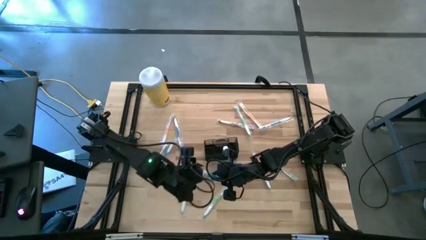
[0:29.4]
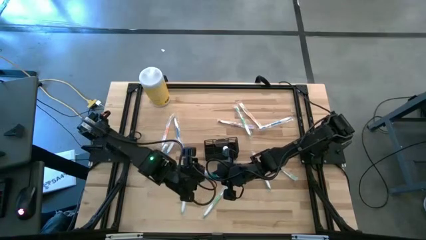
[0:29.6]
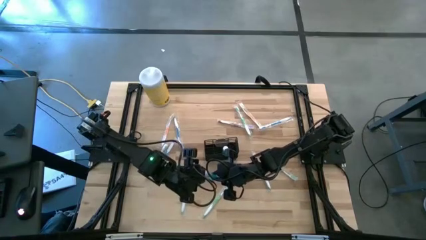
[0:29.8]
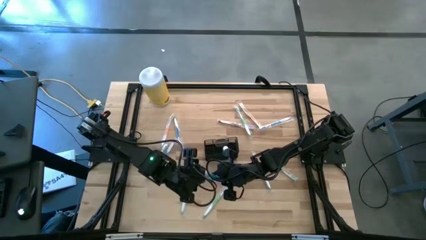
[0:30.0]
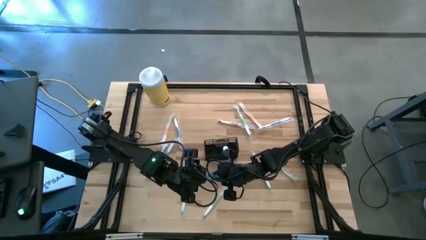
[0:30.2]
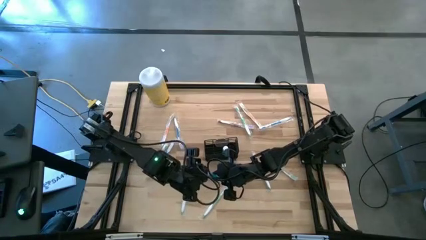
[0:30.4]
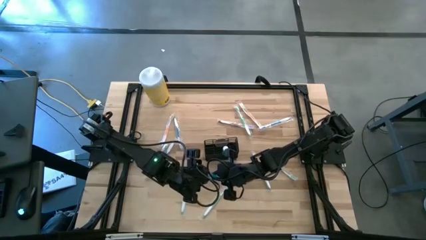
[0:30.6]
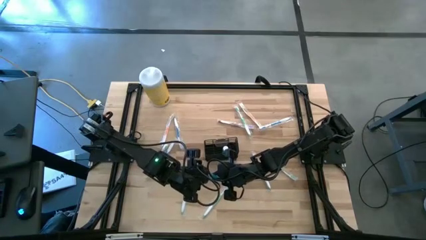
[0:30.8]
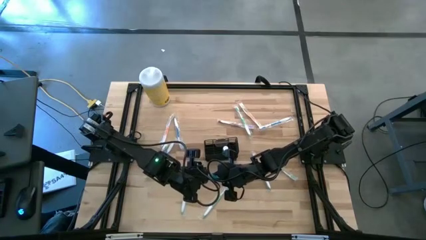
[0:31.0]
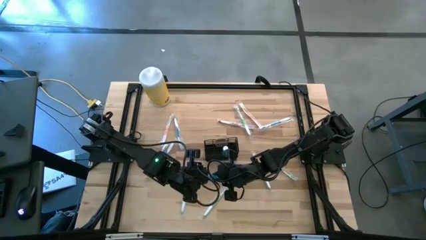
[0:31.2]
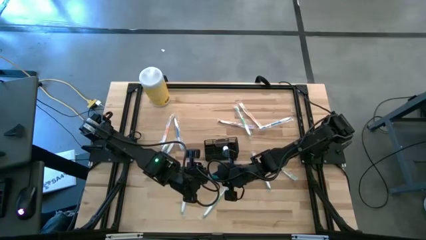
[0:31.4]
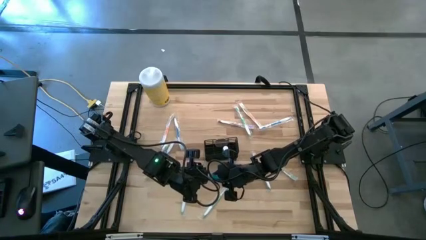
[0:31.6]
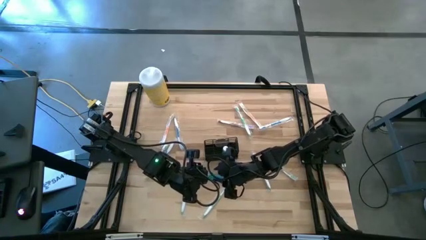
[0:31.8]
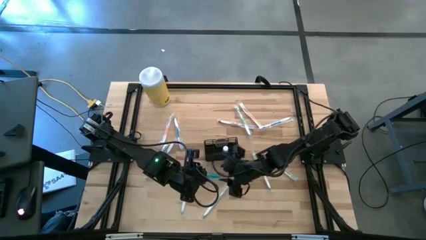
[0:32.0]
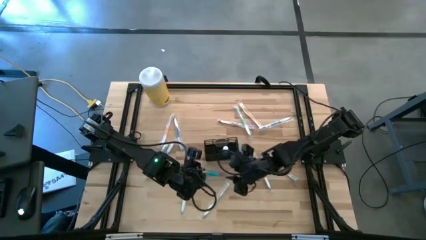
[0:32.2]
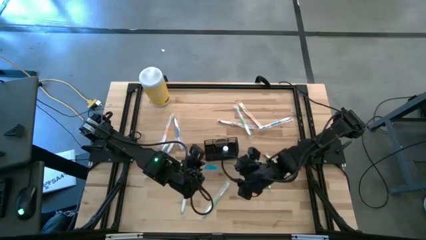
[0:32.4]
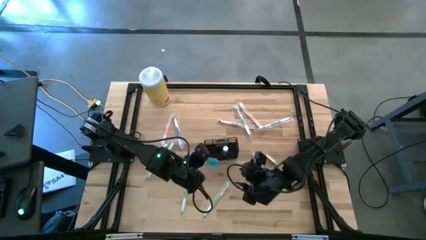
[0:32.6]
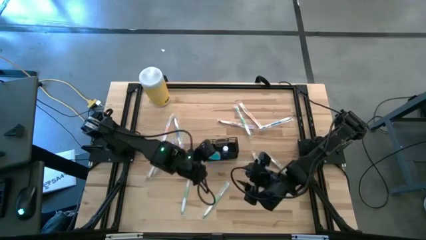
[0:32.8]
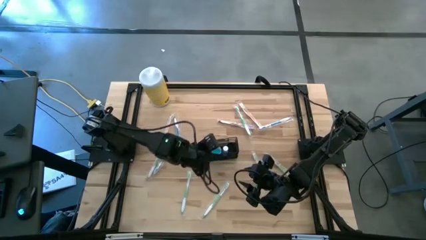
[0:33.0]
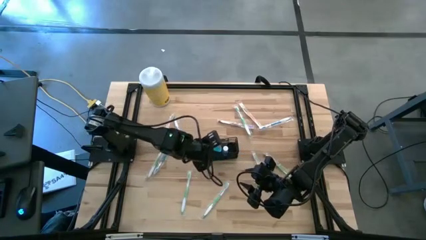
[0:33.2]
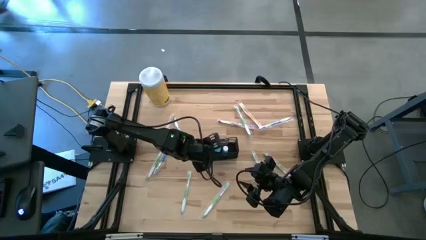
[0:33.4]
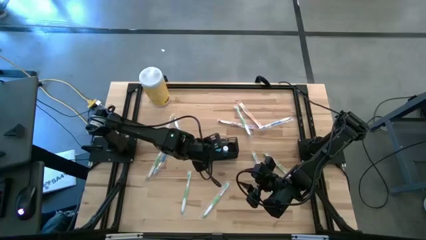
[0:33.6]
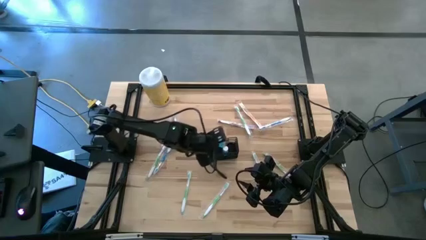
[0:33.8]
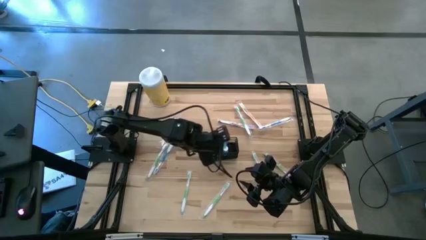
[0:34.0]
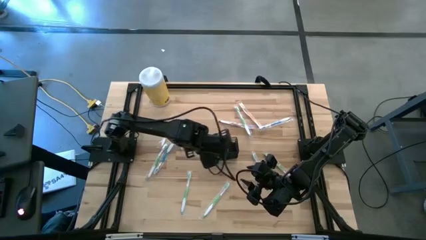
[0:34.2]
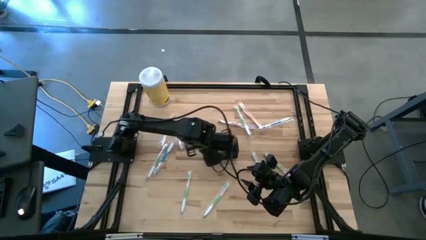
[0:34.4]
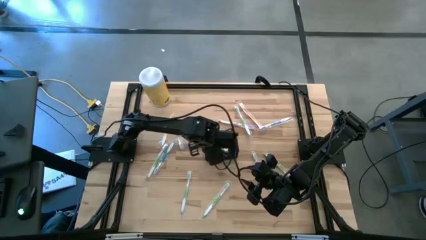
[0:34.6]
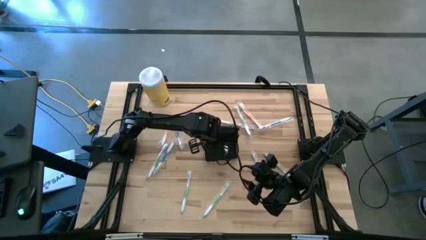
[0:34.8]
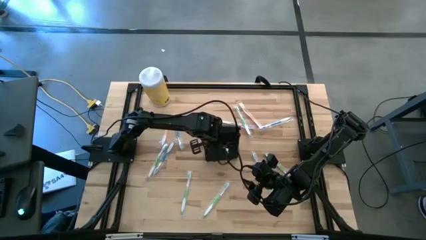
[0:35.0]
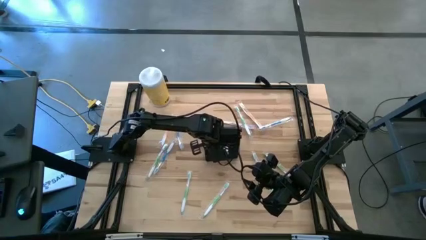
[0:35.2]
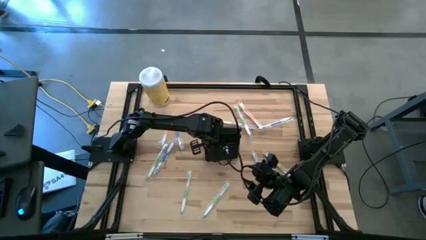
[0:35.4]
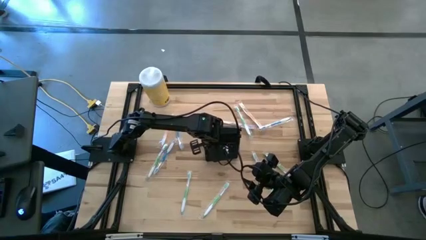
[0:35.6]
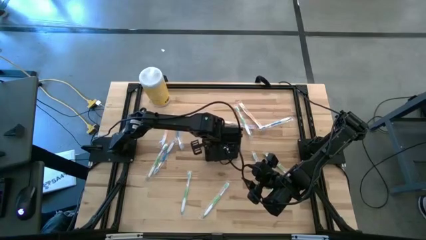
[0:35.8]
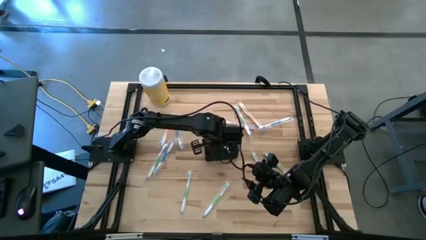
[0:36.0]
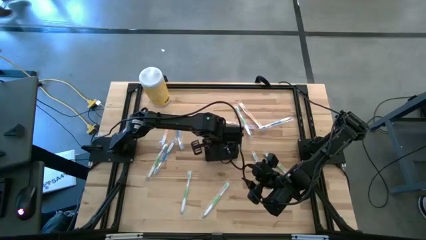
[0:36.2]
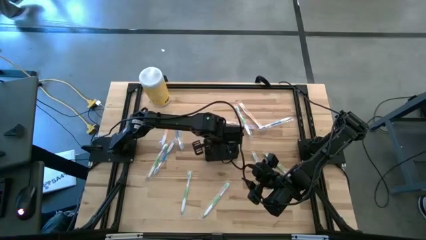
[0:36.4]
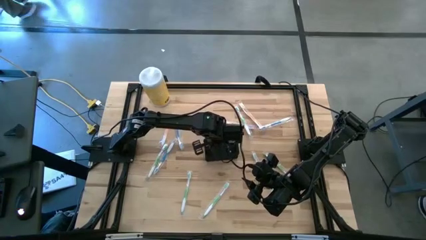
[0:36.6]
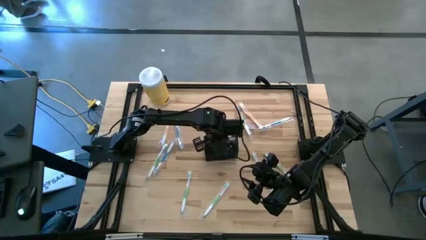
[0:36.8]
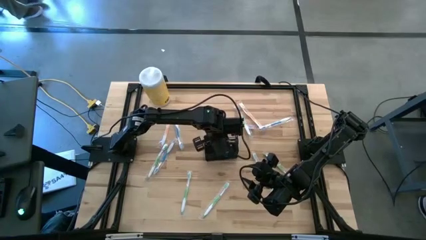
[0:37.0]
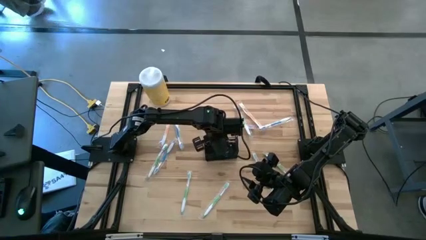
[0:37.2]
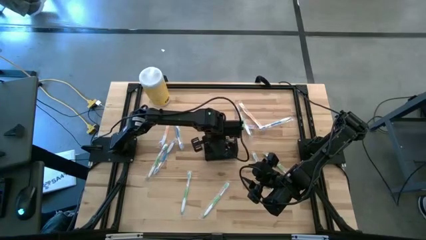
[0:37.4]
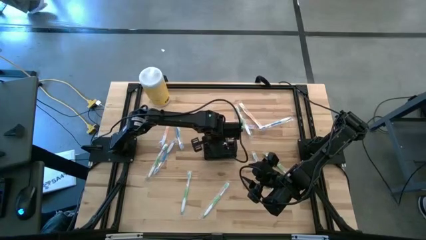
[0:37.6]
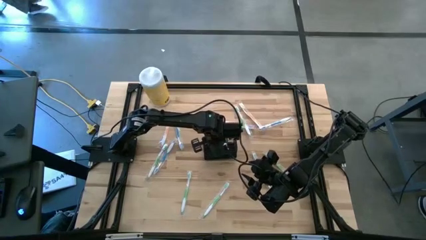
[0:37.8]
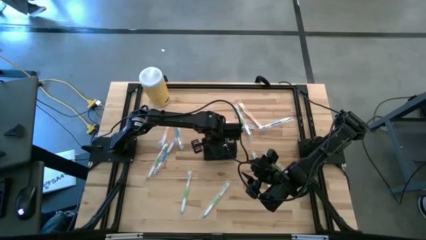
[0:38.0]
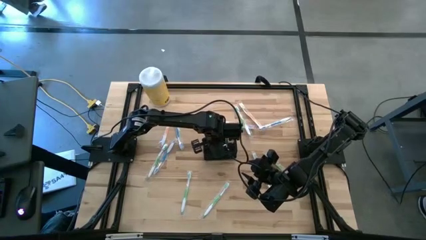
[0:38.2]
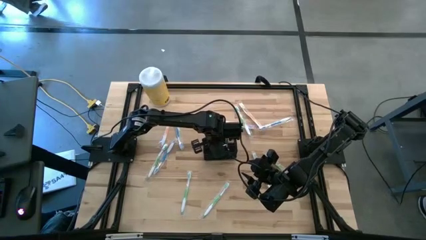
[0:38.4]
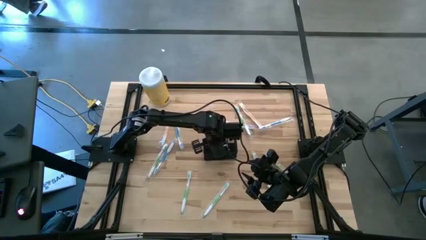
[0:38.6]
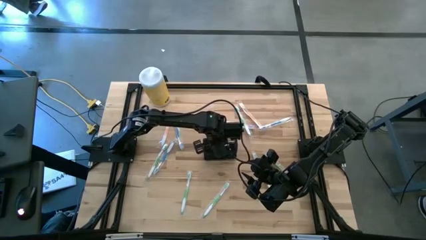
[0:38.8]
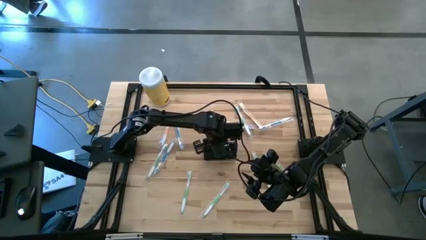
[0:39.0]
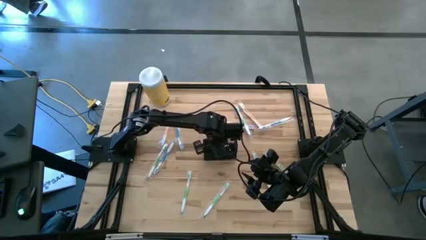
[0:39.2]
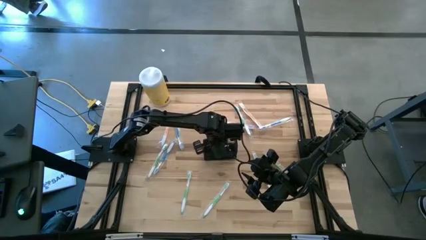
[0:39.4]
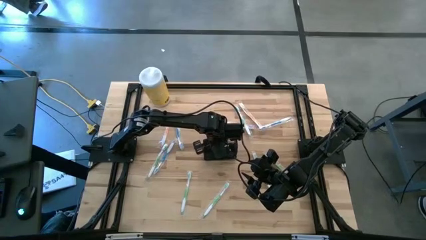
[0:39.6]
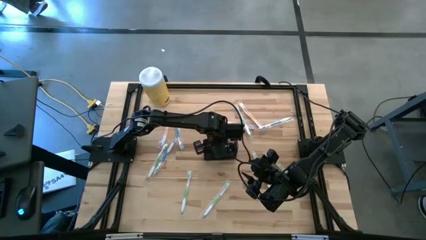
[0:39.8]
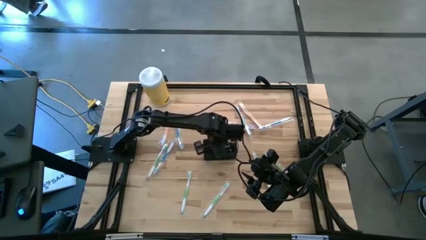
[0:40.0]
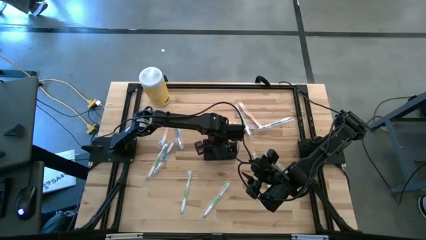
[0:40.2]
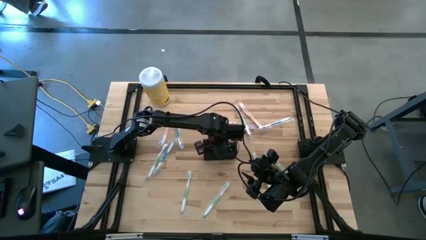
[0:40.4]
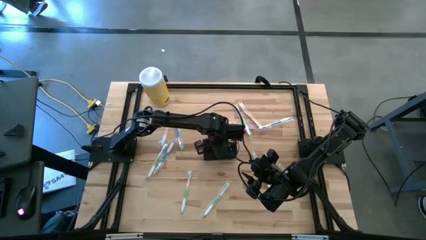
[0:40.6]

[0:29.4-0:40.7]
Task: Pick & Place toothbrushing station
Put the blue mouthwash into the wire organizer
